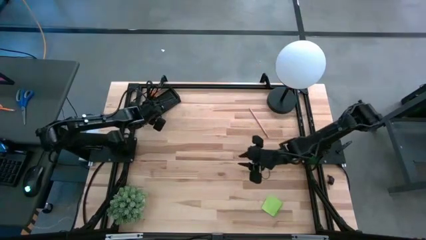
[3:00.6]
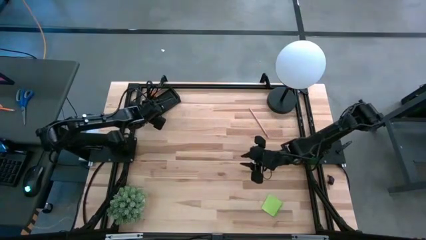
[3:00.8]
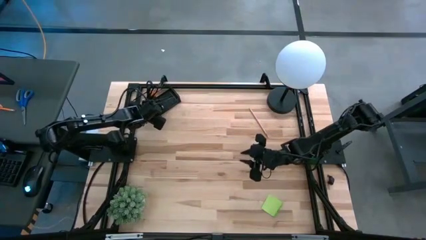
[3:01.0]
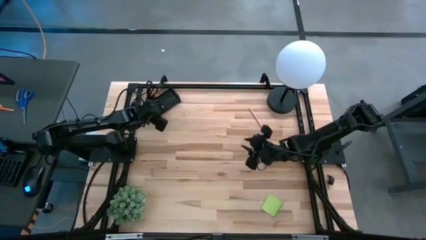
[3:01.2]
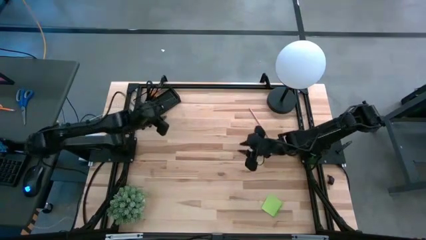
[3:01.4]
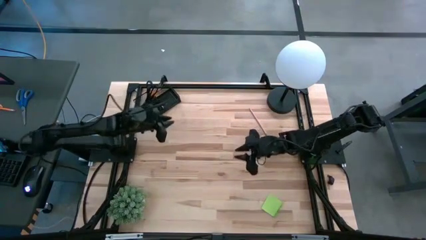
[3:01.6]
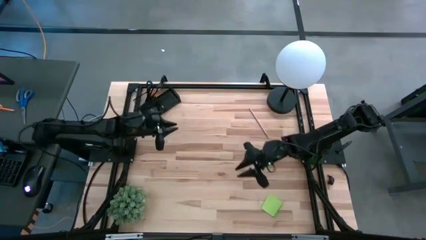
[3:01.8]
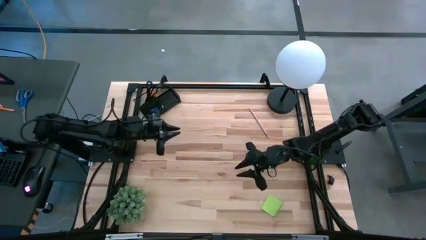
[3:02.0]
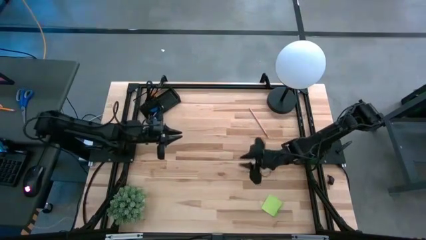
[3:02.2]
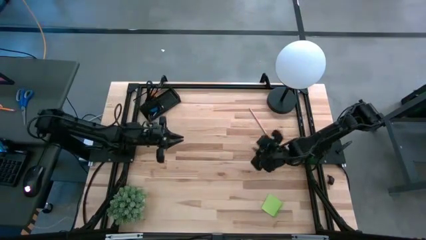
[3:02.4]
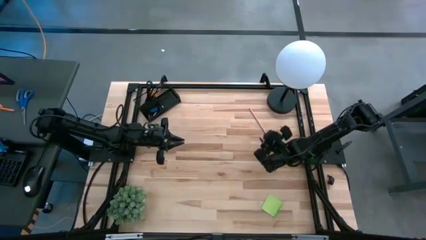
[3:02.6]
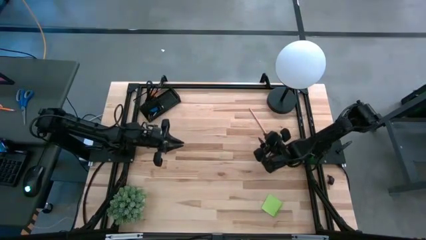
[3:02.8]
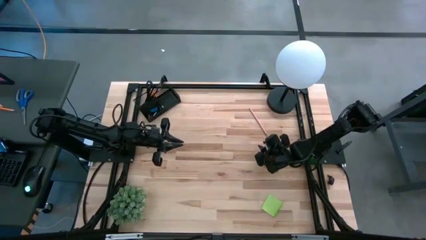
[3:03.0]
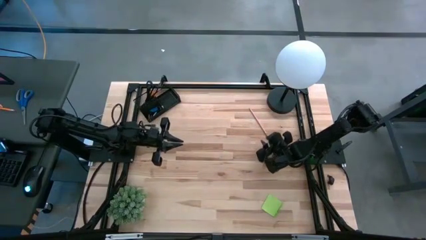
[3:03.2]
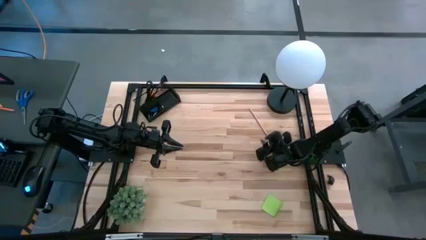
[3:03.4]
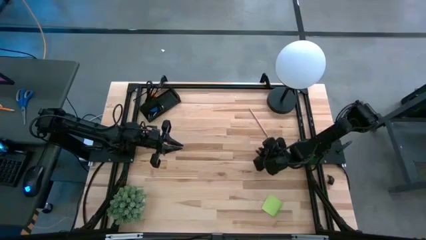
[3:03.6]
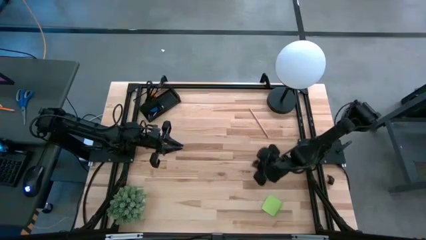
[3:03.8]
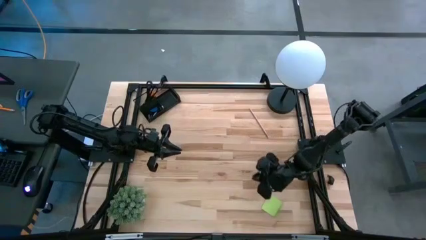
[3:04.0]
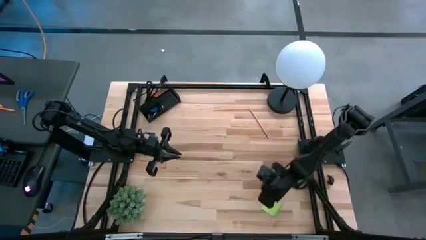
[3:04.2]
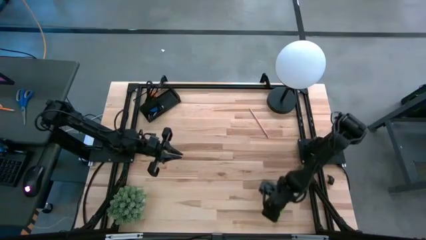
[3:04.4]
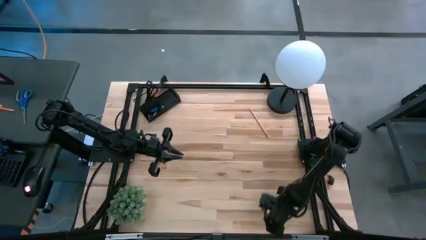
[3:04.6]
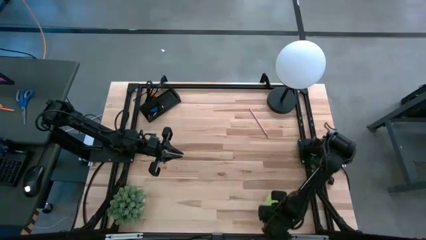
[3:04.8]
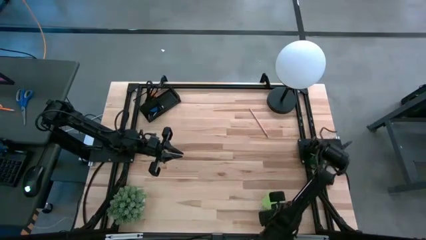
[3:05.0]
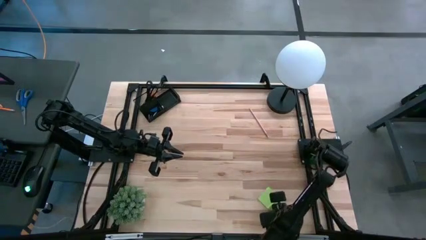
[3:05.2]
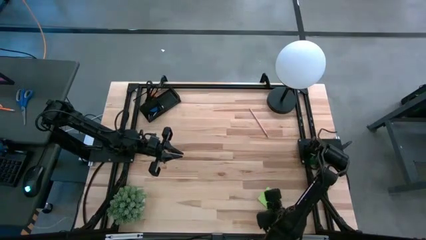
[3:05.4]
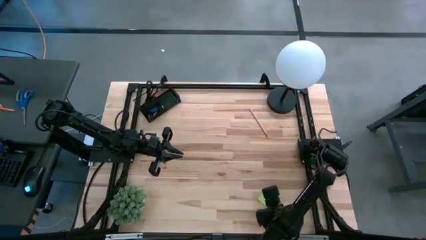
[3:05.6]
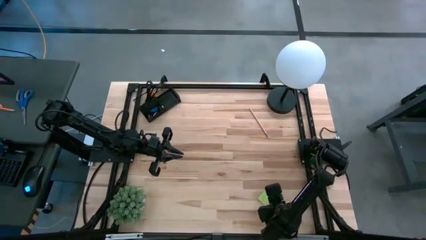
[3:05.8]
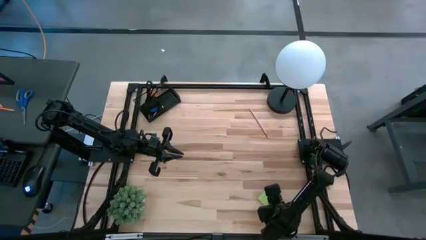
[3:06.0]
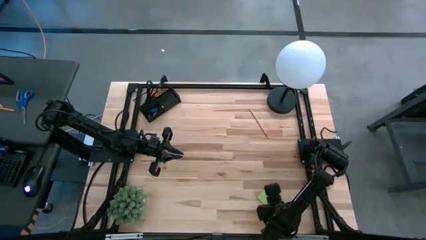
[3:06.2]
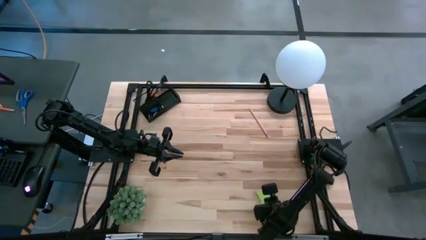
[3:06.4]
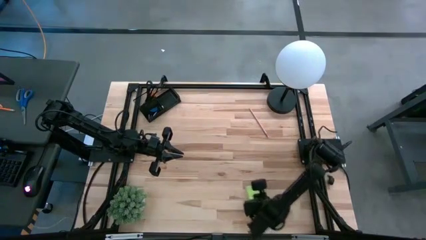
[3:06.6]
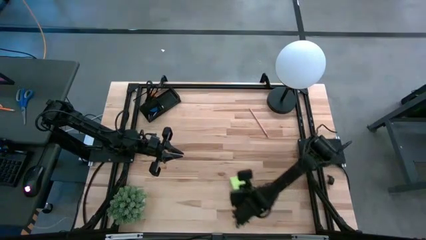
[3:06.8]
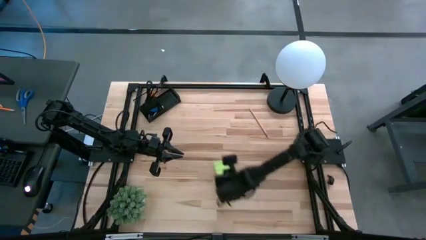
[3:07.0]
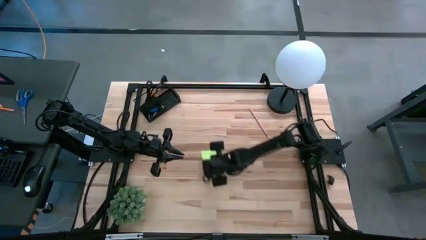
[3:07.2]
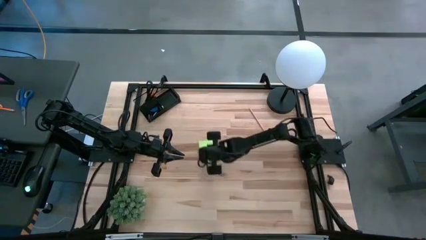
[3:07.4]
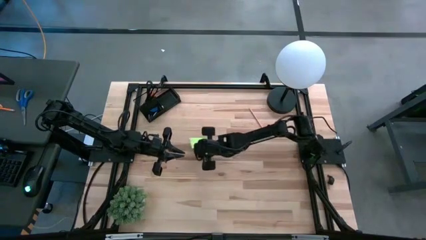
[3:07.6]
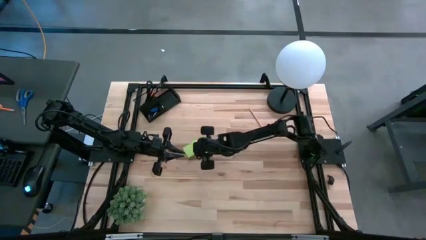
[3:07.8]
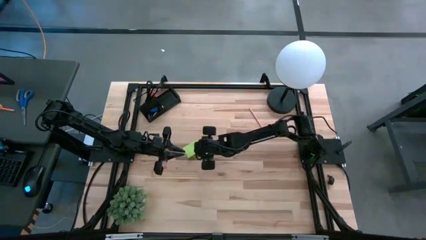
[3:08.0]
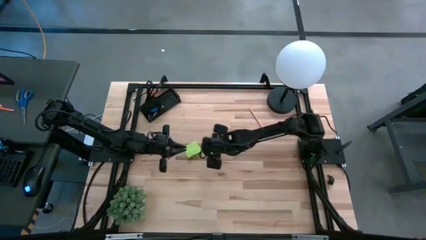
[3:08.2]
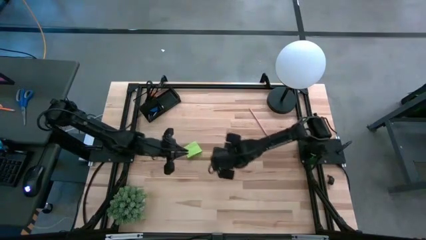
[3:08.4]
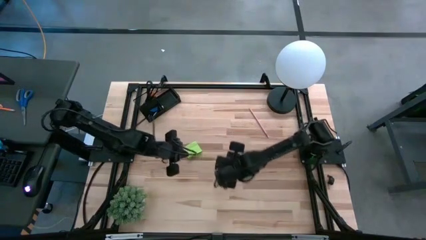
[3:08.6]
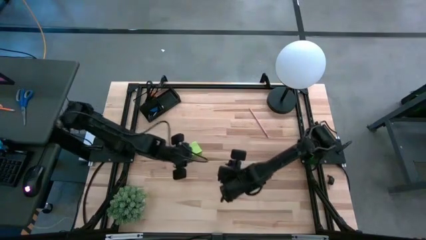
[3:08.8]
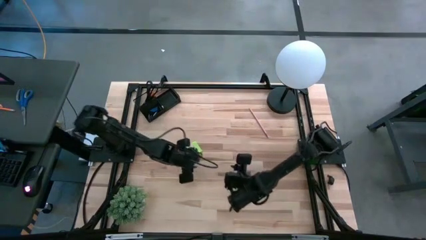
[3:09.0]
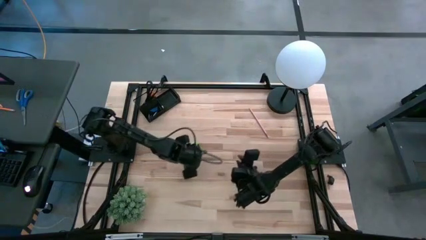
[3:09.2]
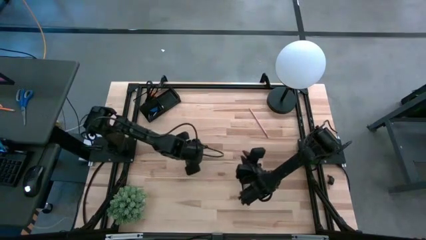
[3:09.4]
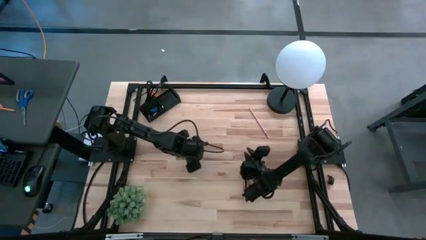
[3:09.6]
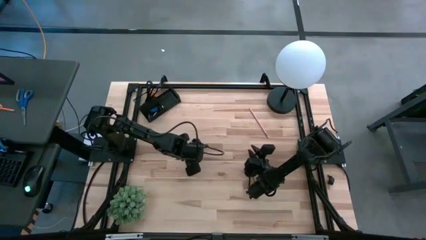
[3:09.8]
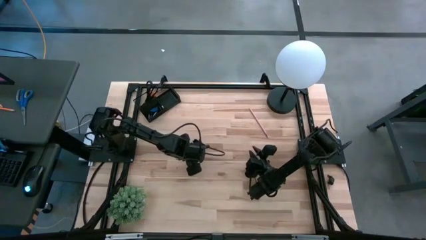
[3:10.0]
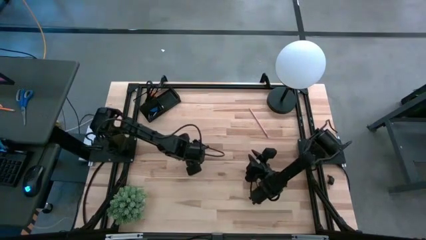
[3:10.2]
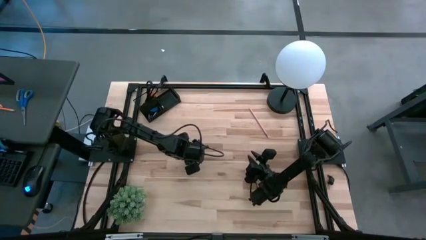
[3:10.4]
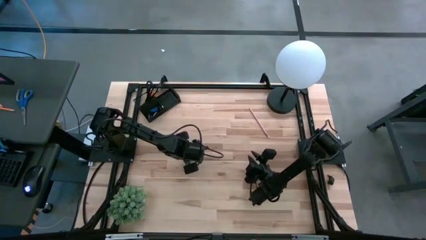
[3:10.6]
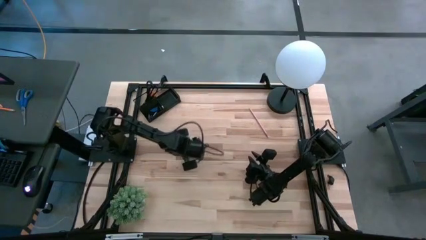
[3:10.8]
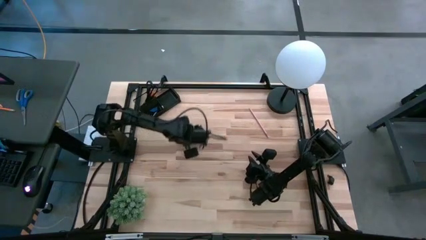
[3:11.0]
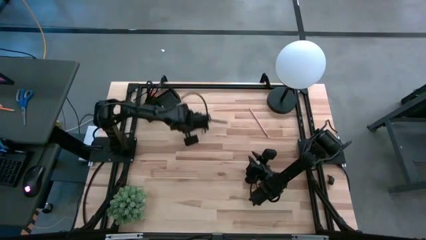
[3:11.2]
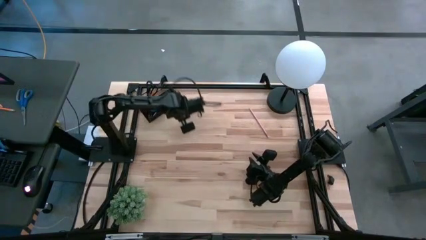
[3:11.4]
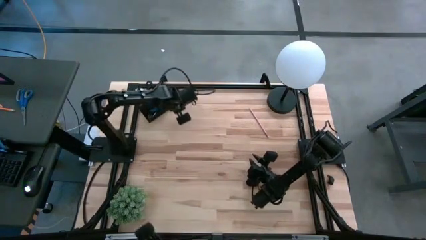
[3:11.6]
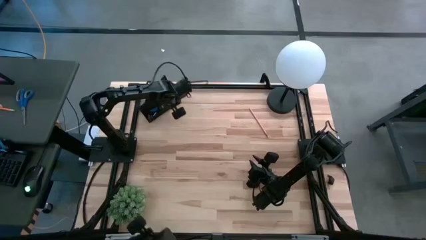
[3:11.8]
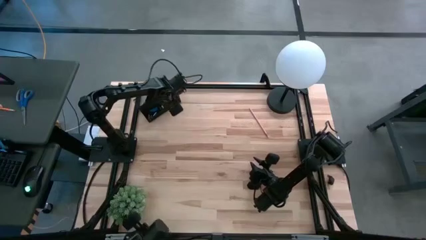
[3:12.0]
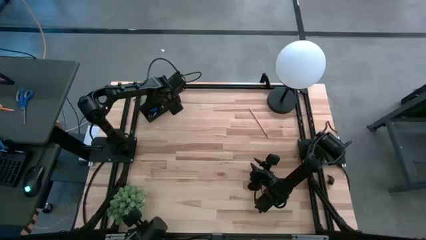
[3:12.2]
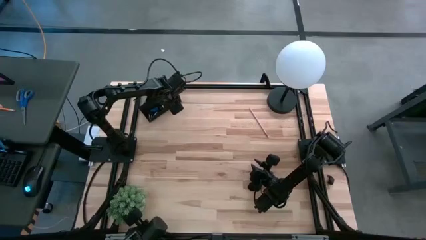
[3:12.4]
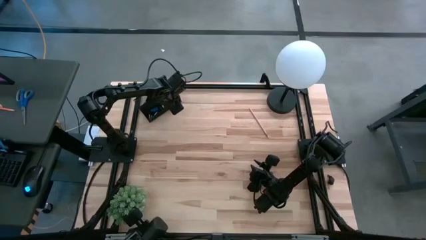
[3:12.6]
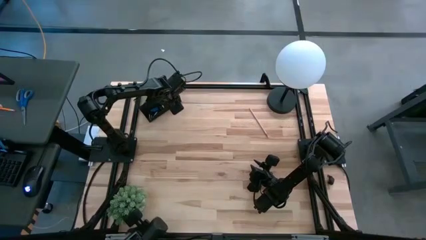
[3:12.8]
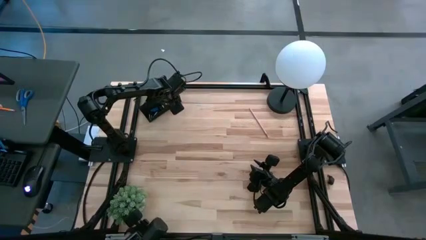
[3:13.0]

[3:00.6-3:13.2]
Task: Pick and place office supplies into organizer
Put the green sticky notes into the black desk organizer

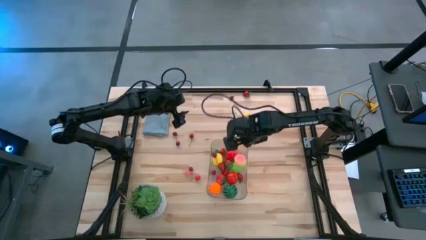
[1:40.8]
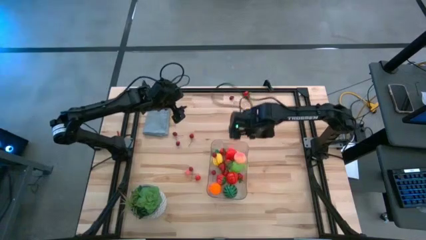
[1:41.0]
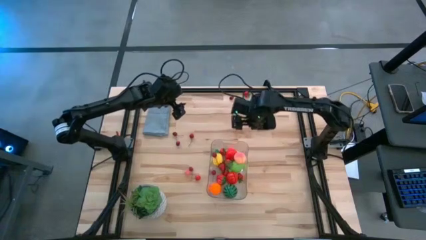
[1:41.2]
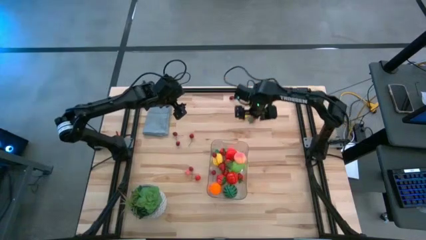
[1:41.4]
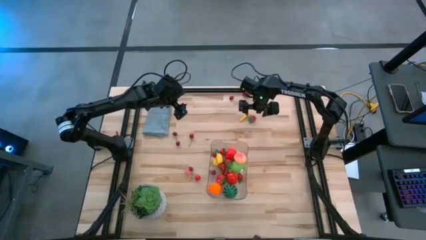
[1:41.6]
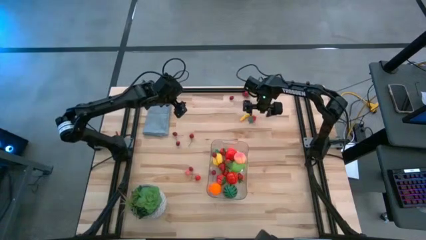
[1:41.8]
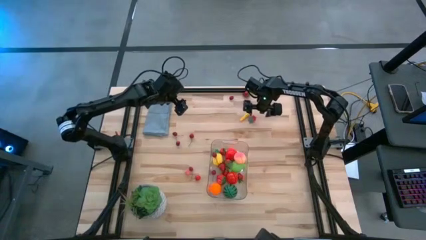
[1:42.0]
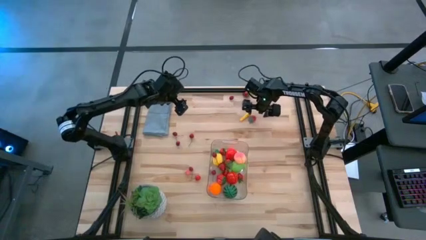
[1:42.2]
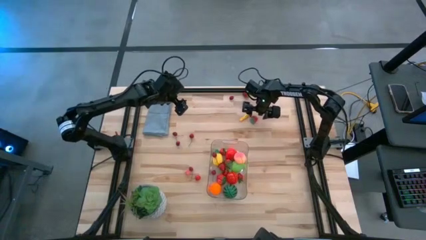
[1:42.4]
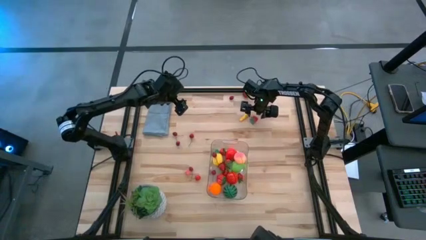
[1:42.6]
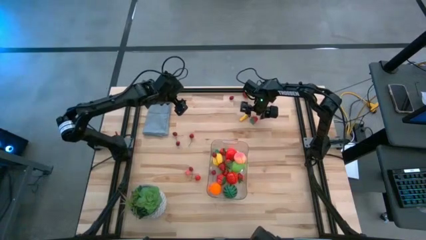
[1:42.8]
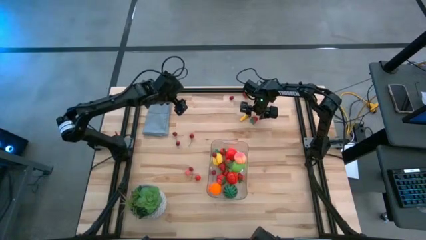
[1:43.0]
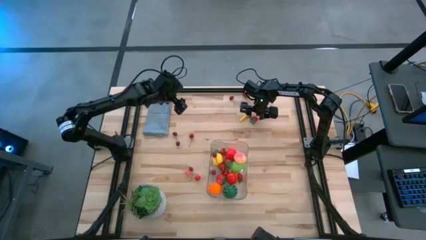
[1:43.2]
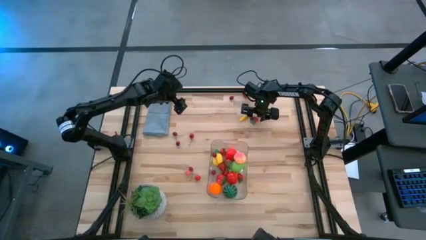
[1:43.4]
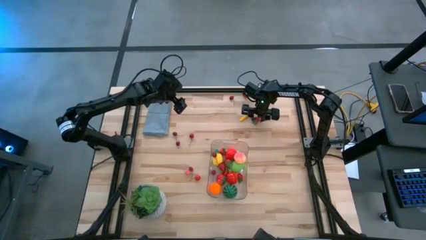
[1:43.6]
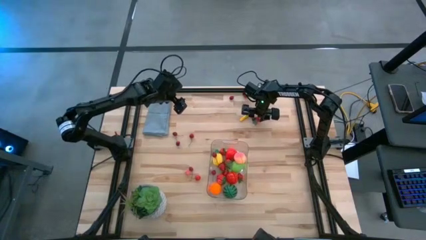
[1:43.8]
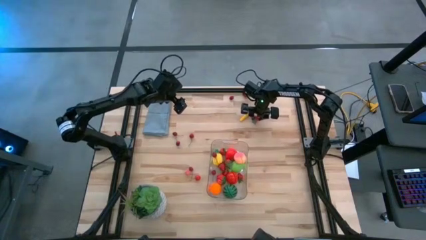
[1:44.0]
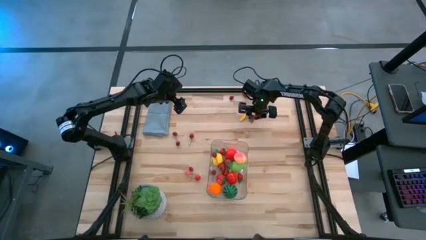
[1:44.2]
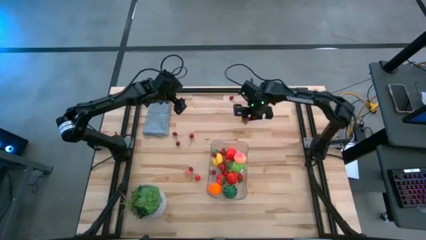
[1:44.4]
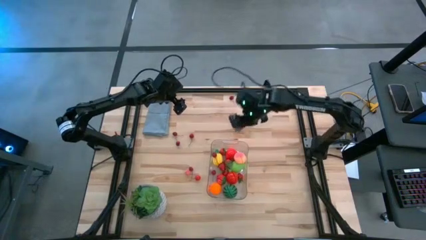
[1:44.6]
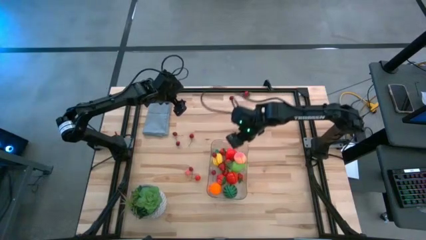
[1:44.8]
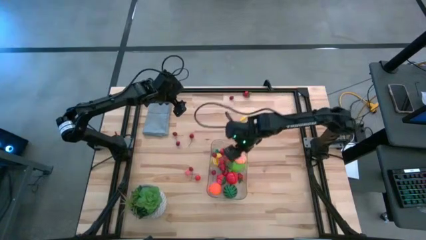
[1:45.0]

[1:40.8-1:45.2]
Task: Pick and placing Produce into tupperware
Put the strawberry into the transparent bin
